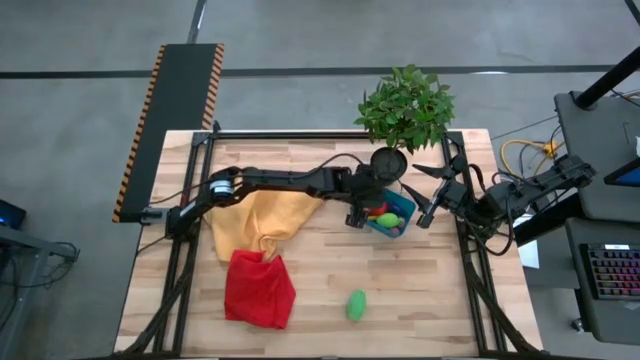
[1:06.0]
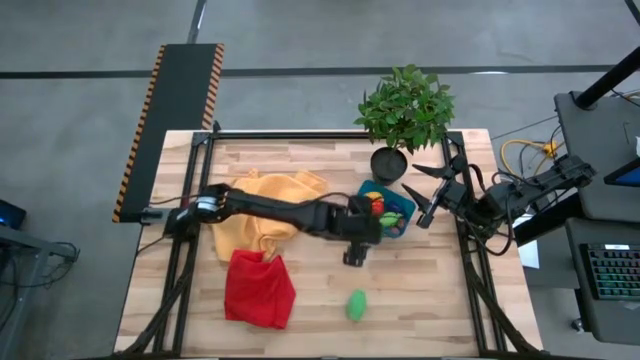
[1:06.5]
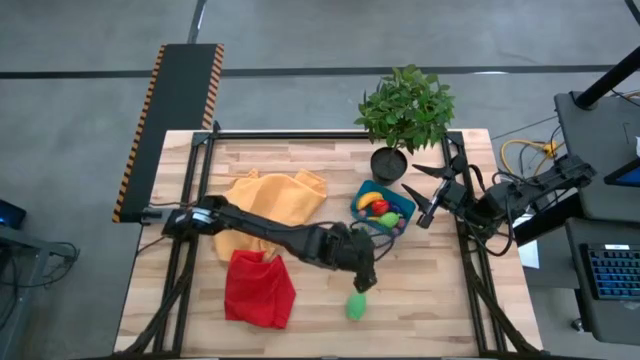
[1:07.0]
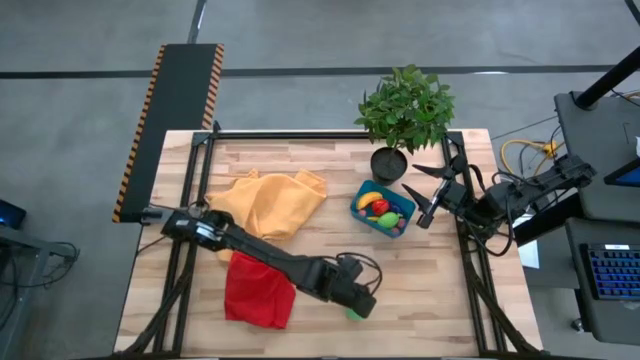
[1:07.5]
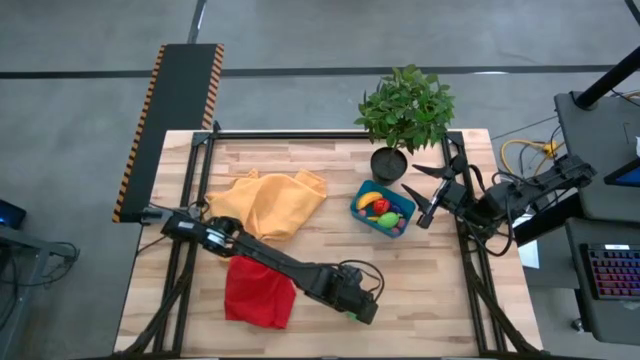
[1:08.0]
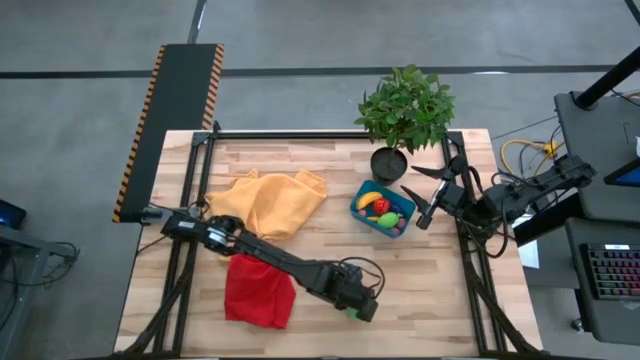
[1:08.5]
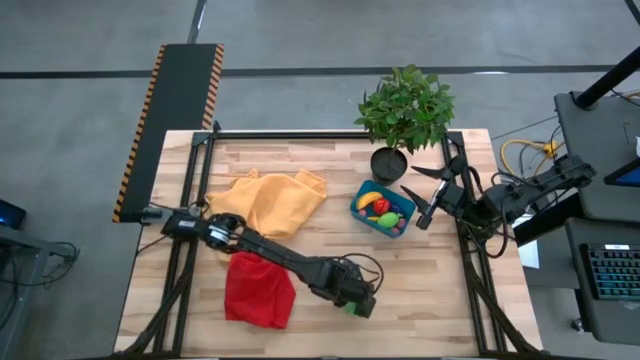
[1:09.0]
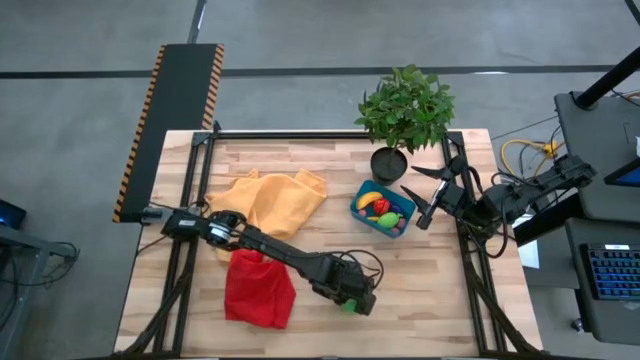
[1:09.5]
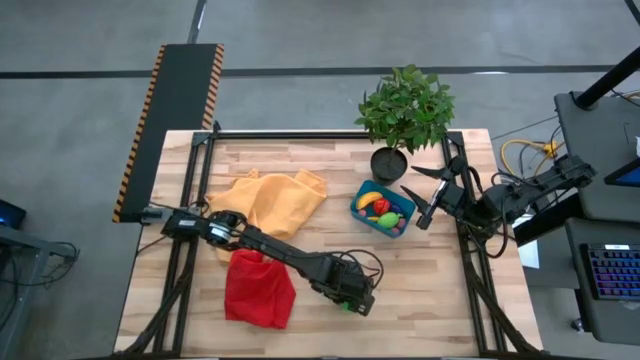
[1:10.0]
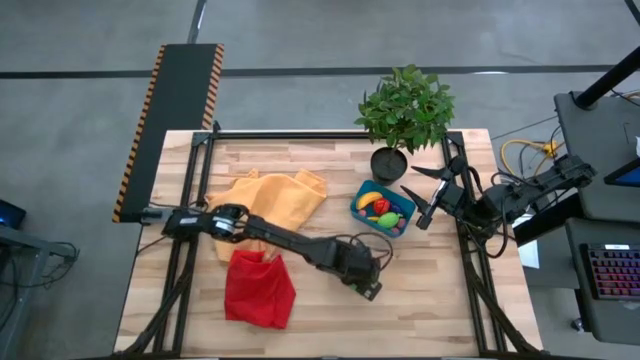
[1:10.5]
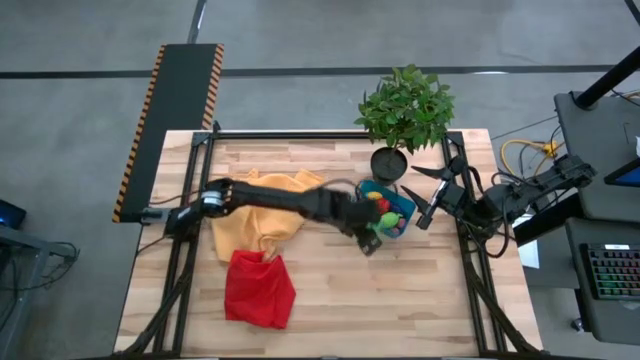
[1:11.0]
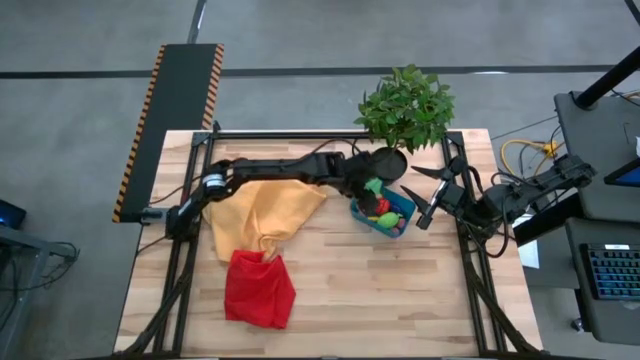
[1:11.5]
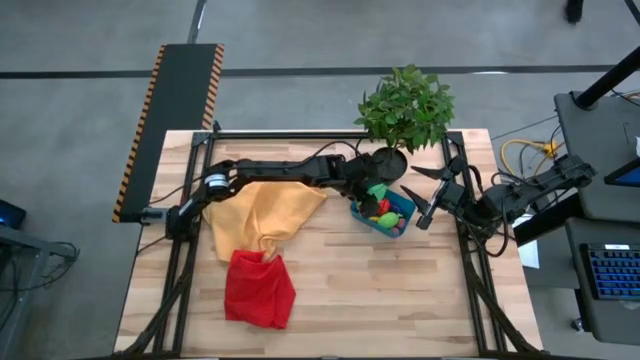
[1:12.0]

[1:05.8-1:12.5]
Task: Pick and placing Produce into tupperware
Put the big corn into the blue bin

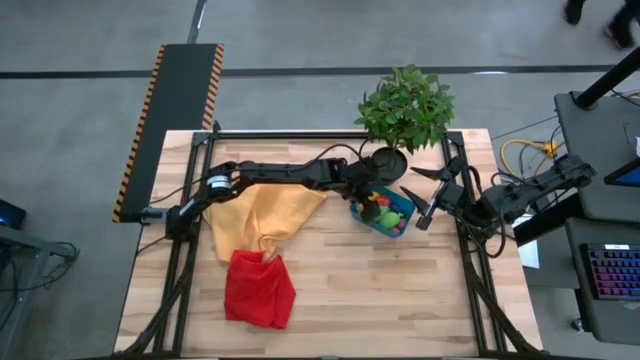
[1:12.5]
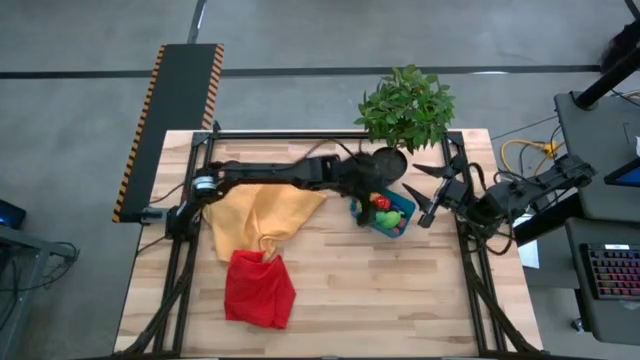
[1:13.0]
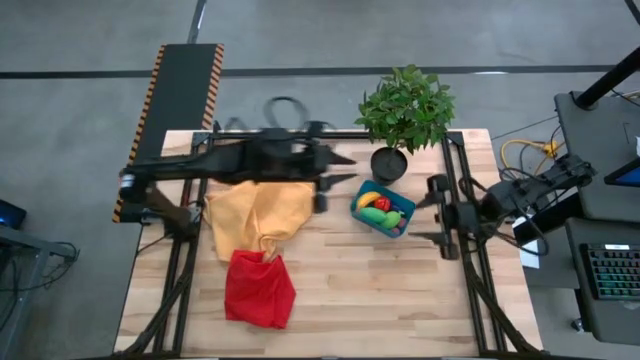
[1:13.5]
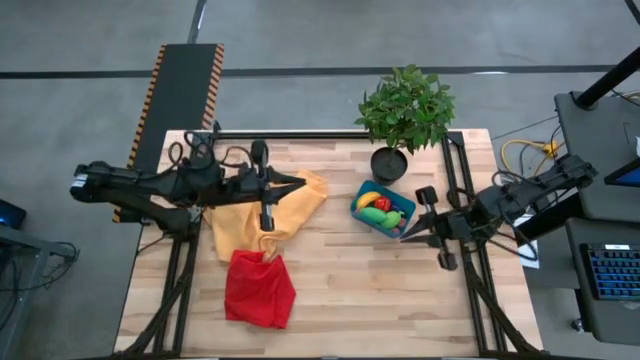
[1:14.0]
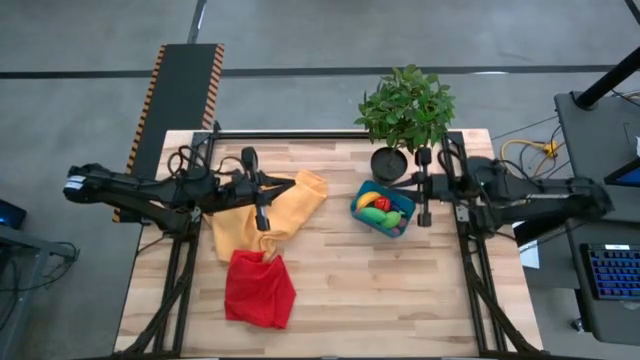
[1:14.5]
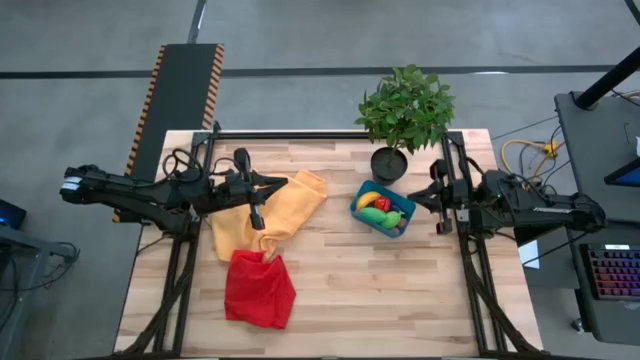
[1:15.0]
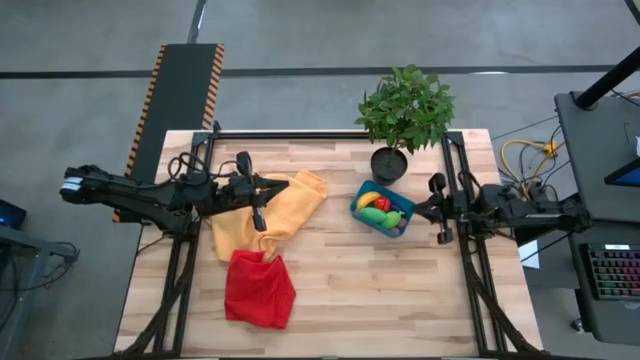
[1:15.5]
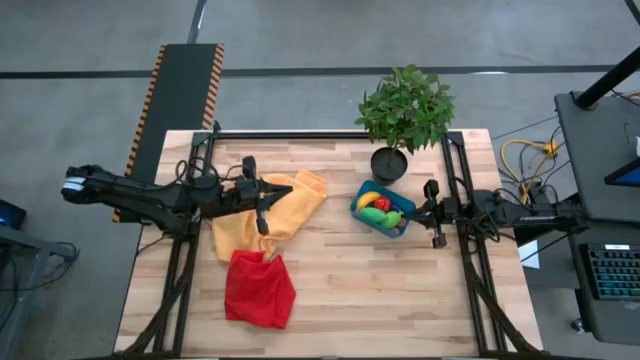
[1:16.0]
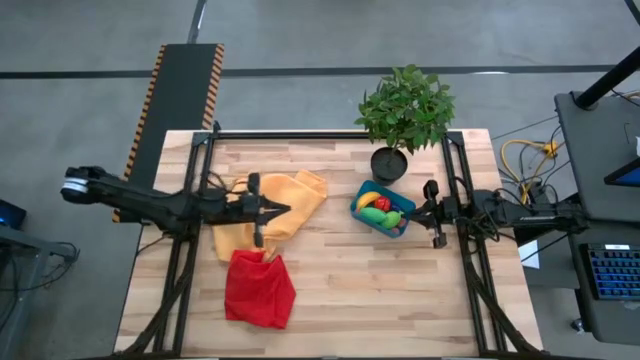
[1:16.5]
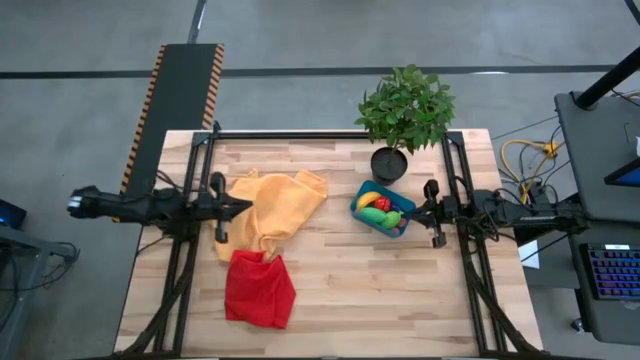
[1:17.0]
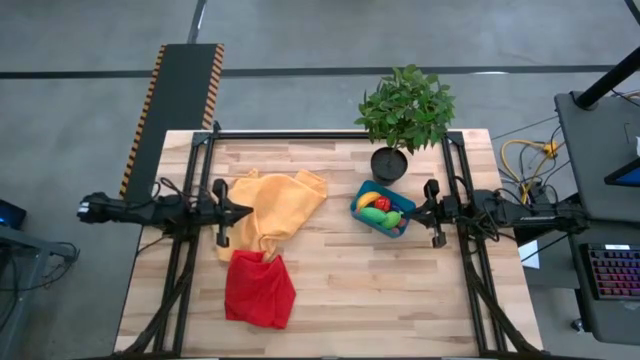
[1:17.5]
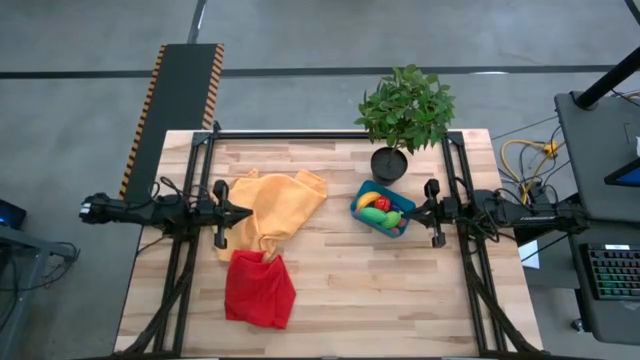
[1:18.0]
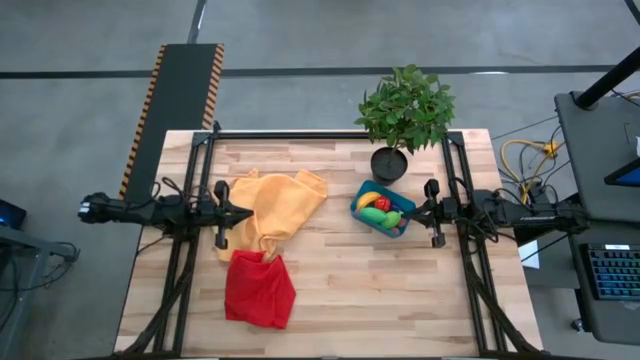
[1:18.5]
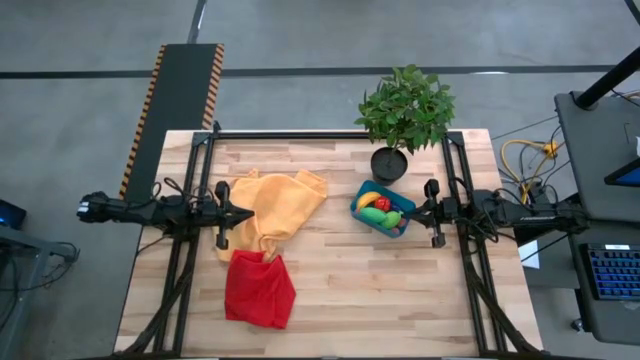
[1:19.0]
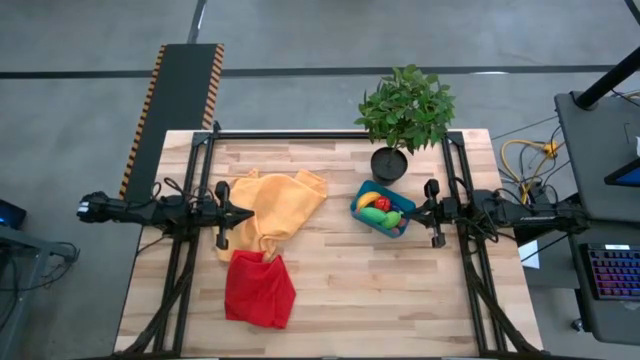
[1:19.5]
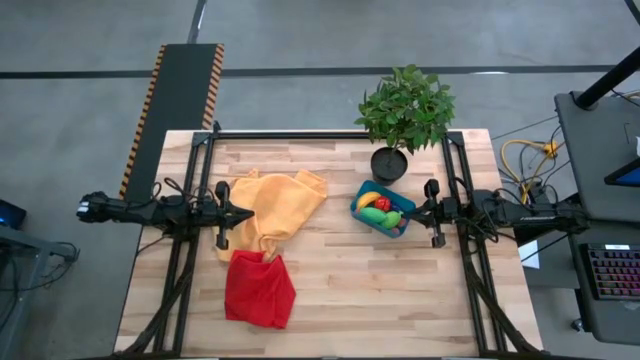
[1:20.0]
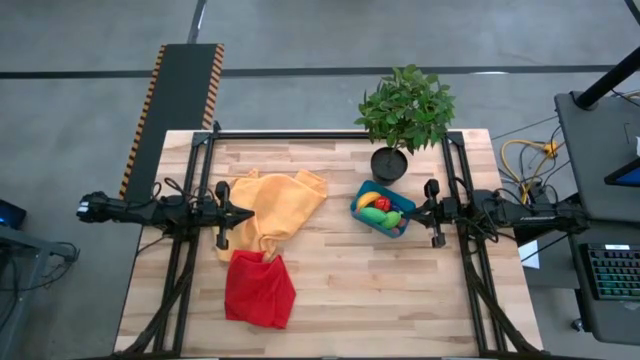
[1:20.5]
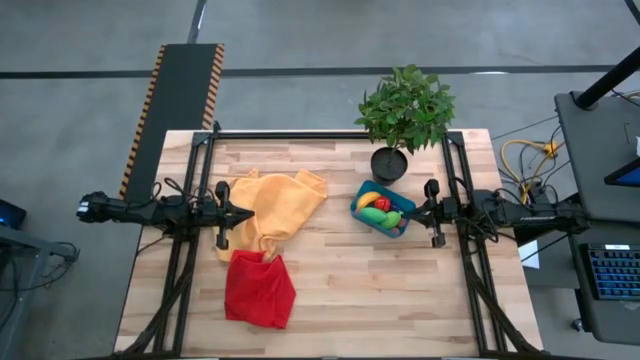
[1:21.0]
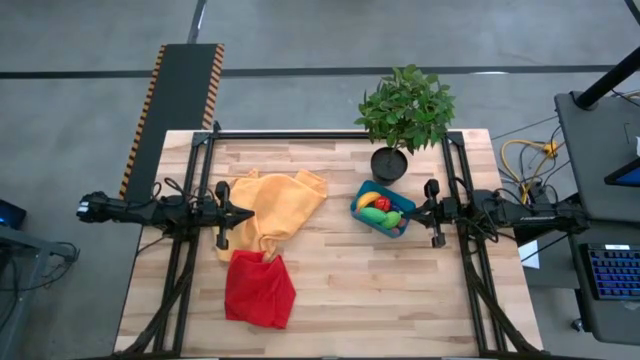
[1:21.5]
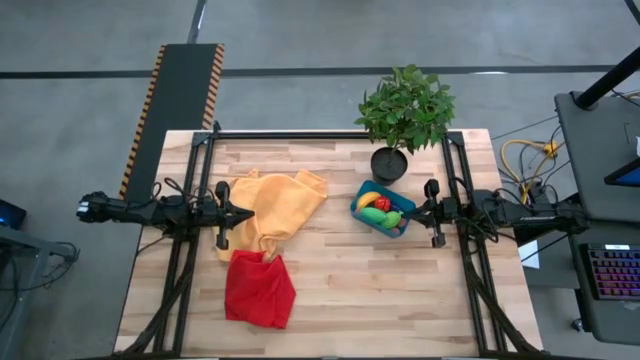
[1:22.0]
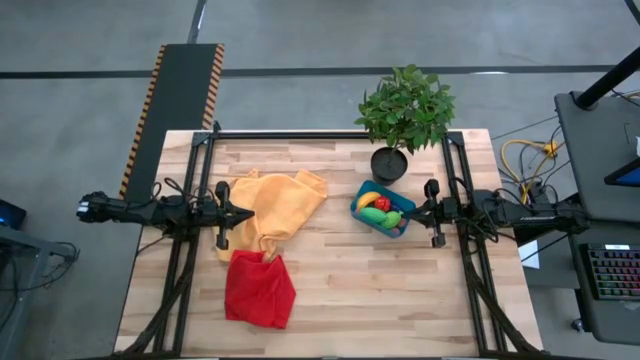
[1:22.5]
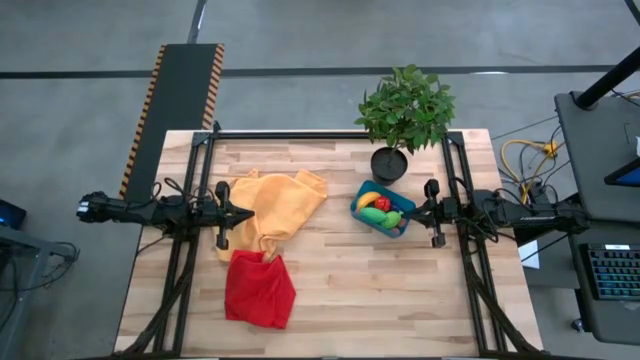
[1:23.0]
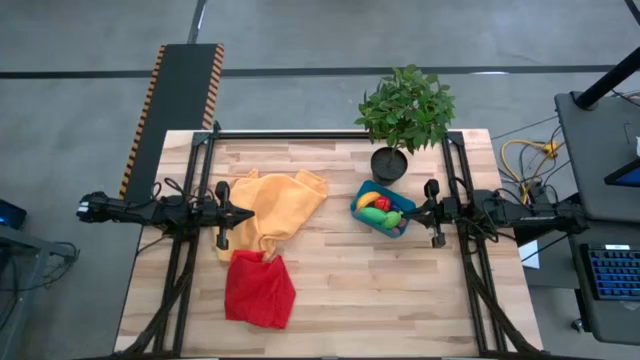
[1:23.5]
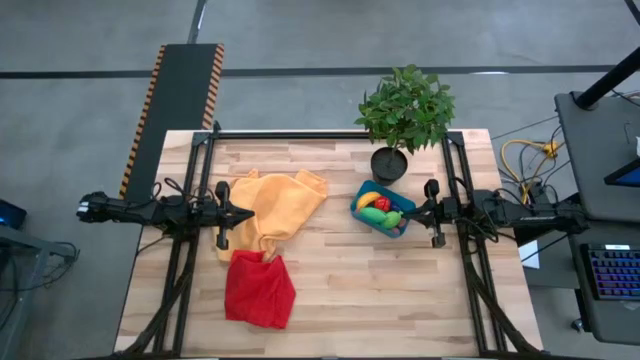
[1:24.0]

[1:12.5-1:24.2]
Return to Home Position

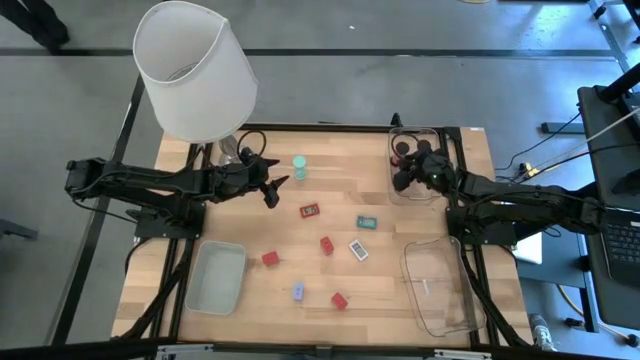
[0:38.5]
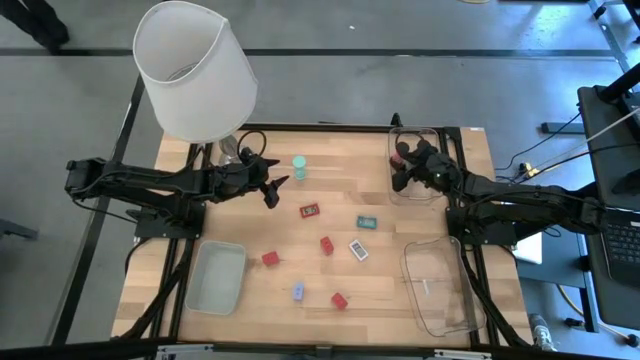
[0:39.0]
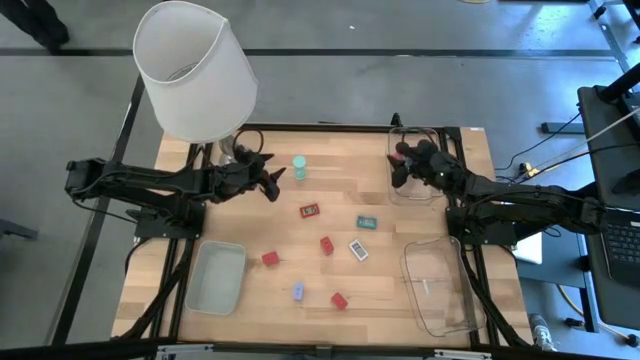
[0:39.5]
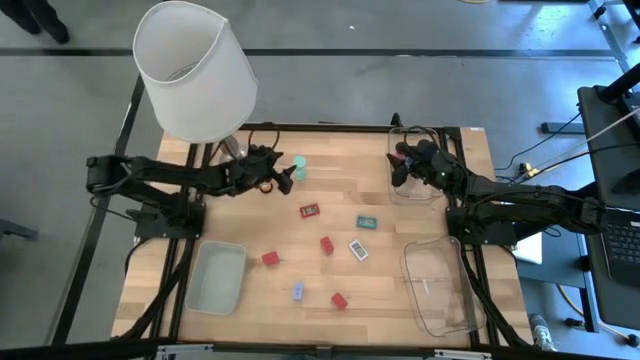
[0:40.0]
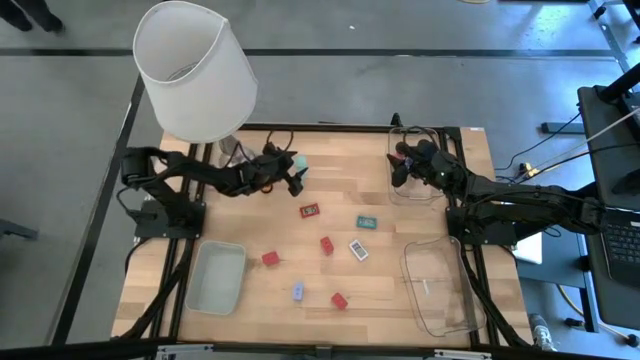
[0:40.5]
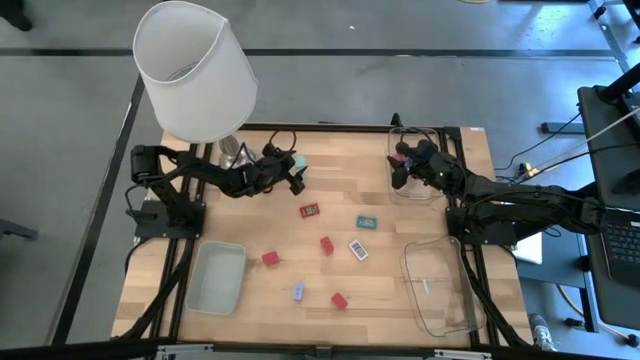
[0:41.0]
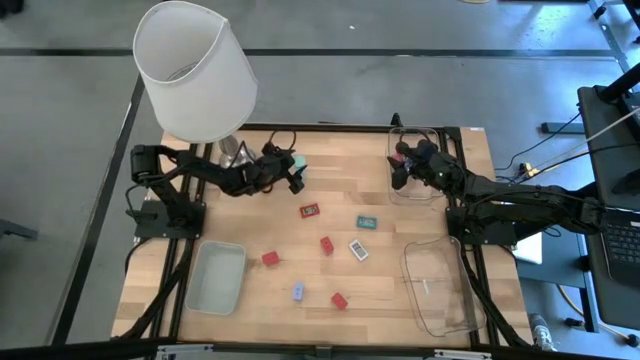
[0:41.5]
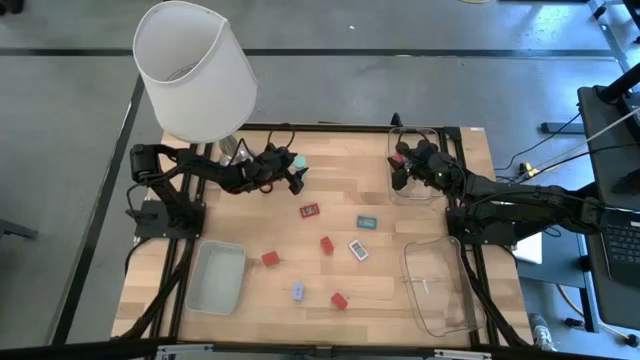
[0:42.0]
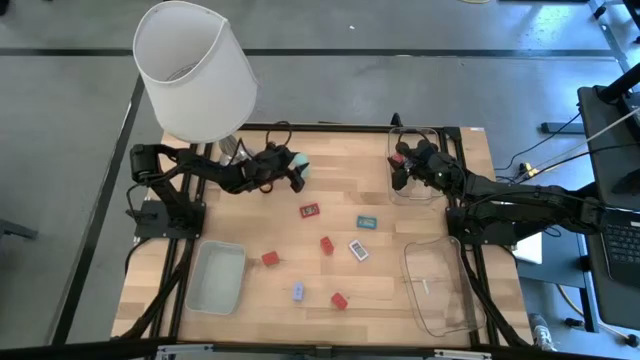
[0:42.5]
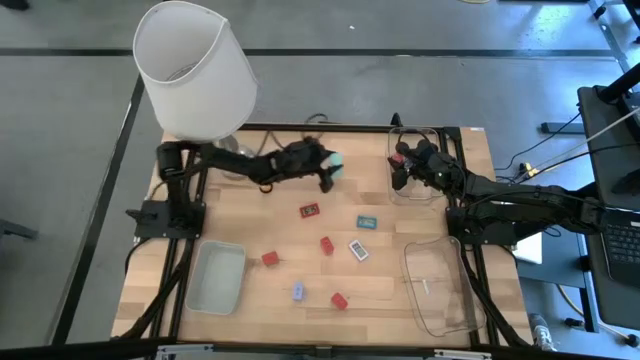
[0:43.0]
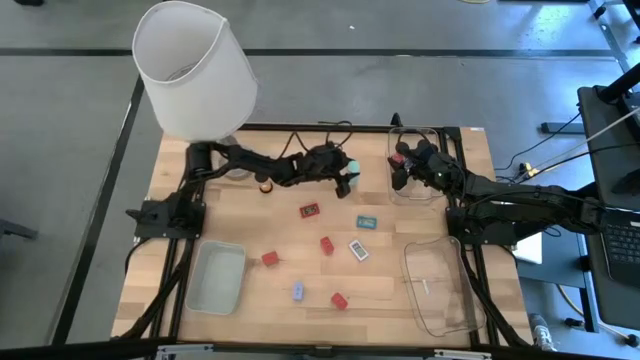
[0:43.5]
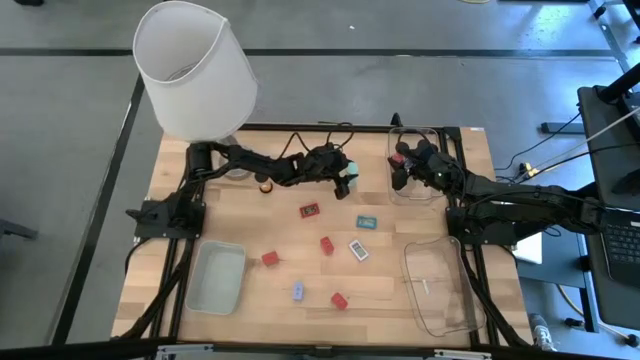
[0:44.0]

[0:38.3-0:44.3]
Task: Pick & Place Office items
Move the light blue sand timer to the top center of the table
